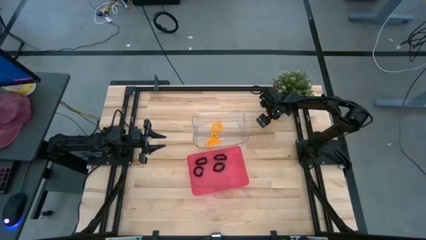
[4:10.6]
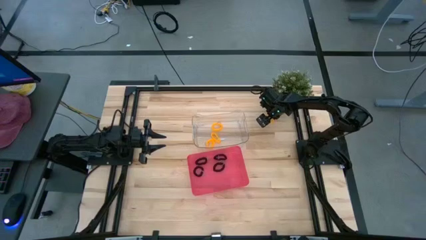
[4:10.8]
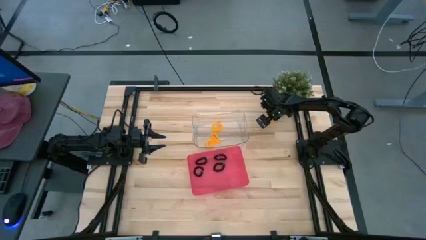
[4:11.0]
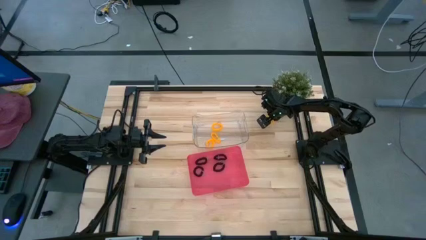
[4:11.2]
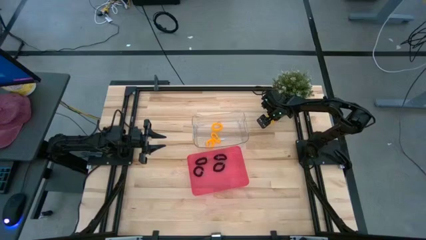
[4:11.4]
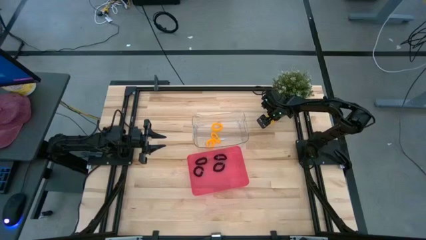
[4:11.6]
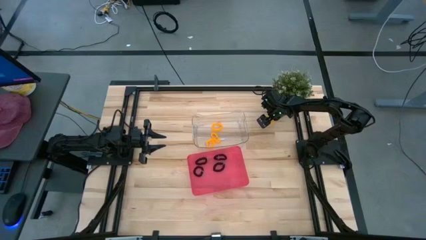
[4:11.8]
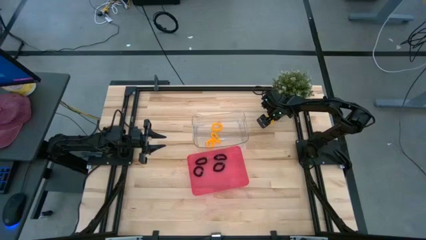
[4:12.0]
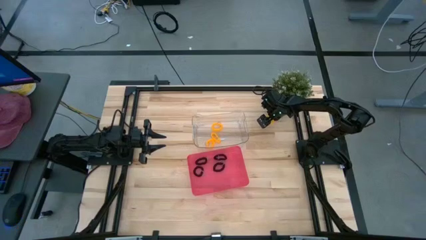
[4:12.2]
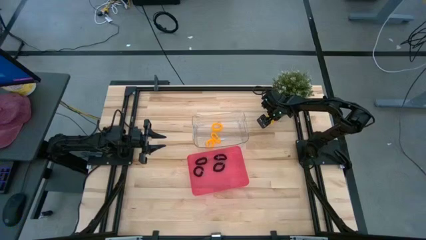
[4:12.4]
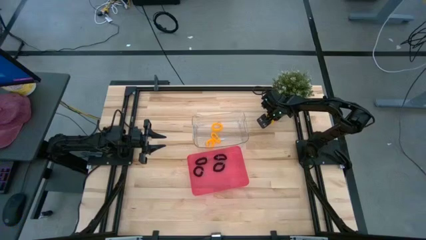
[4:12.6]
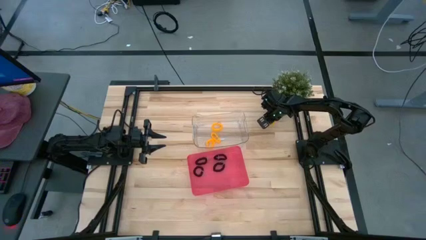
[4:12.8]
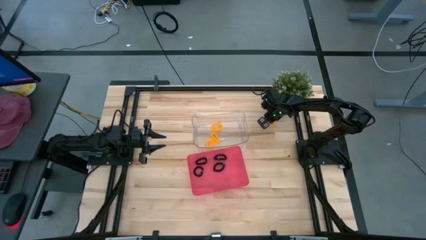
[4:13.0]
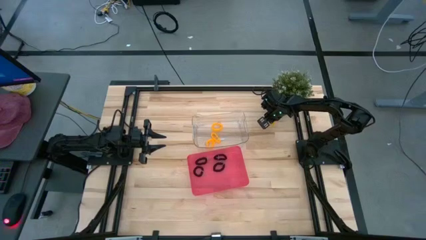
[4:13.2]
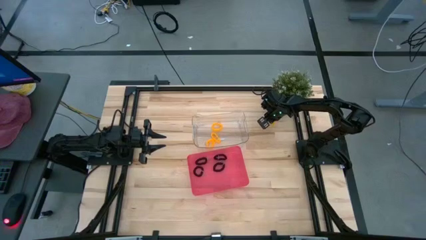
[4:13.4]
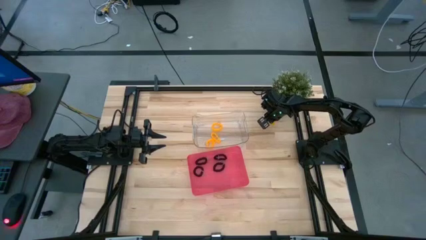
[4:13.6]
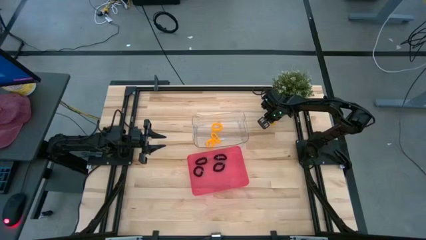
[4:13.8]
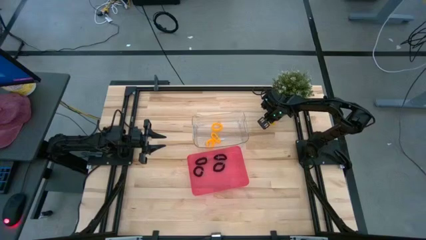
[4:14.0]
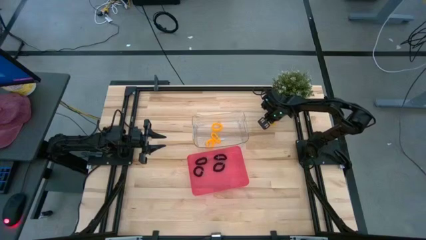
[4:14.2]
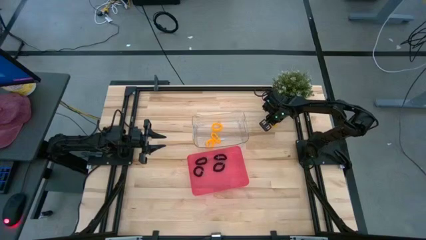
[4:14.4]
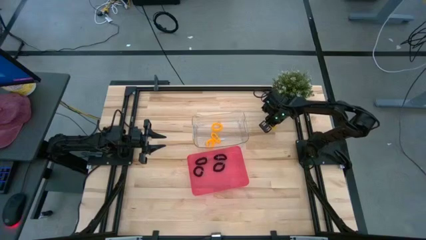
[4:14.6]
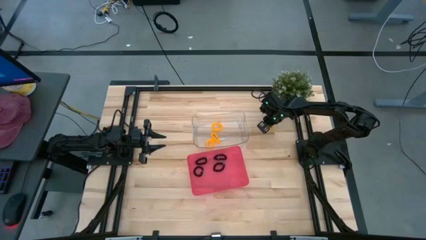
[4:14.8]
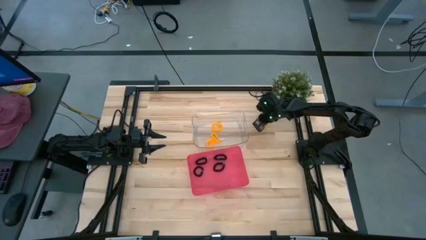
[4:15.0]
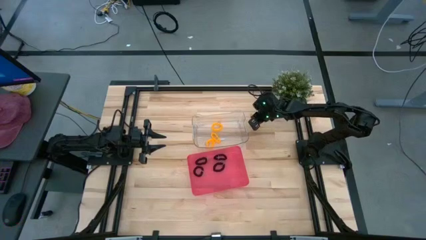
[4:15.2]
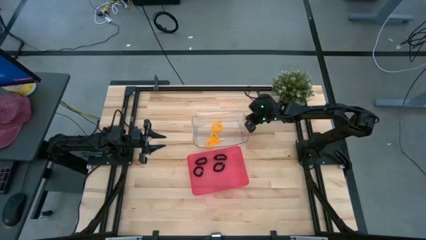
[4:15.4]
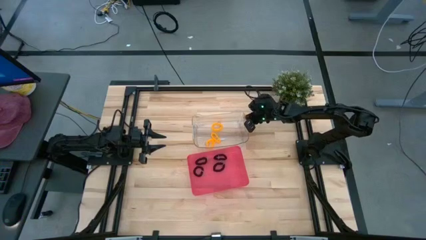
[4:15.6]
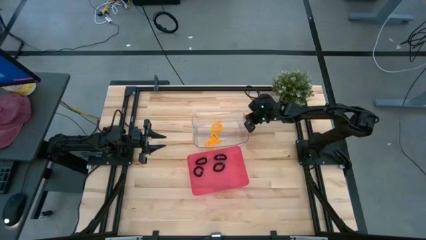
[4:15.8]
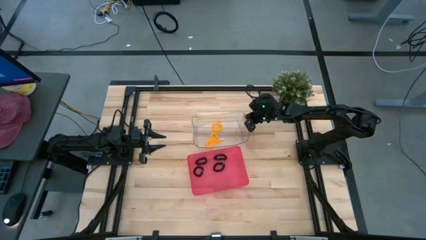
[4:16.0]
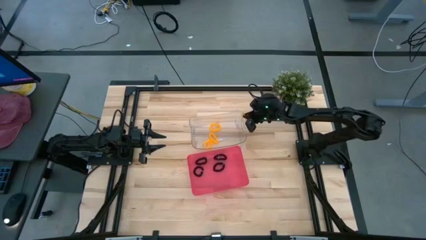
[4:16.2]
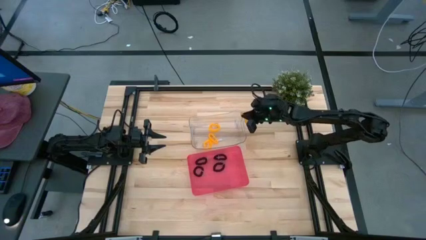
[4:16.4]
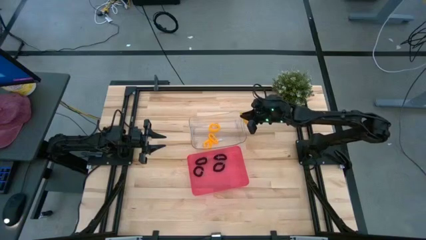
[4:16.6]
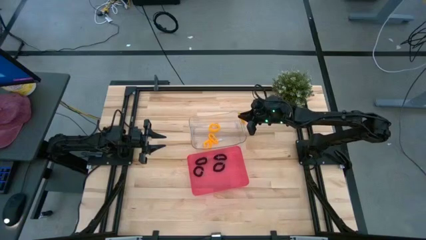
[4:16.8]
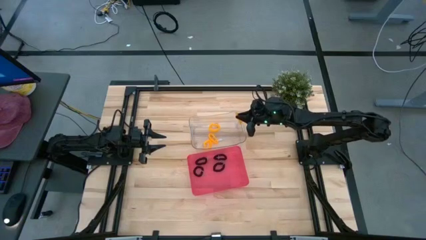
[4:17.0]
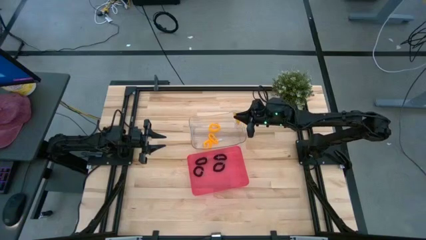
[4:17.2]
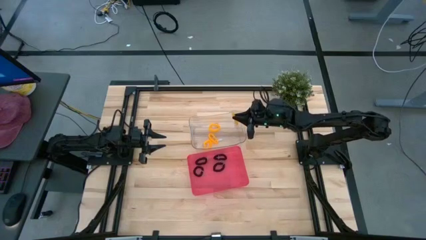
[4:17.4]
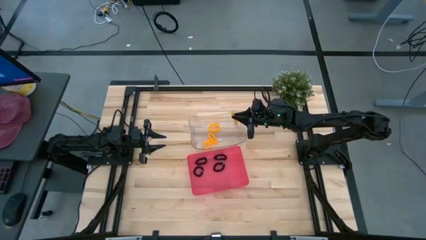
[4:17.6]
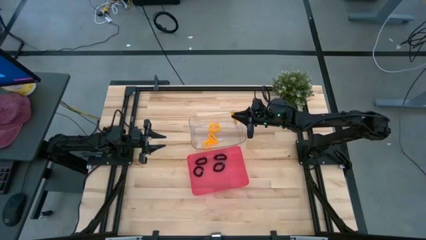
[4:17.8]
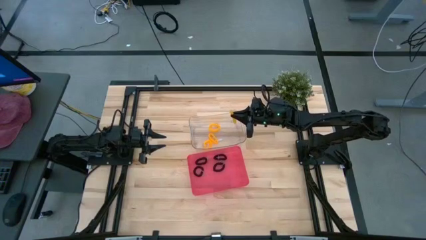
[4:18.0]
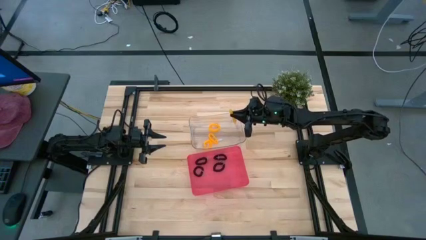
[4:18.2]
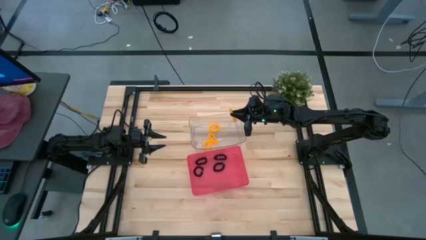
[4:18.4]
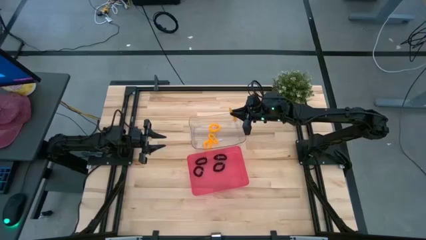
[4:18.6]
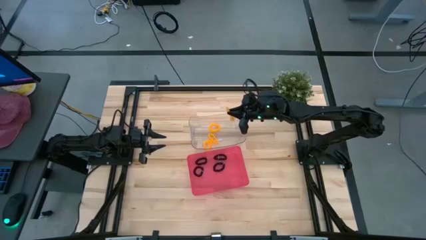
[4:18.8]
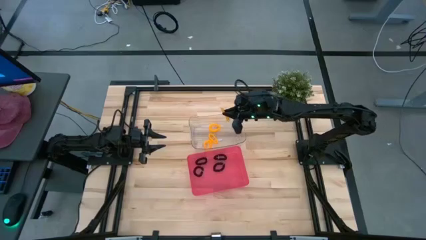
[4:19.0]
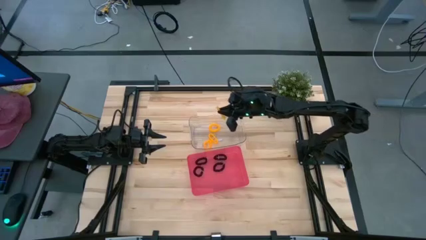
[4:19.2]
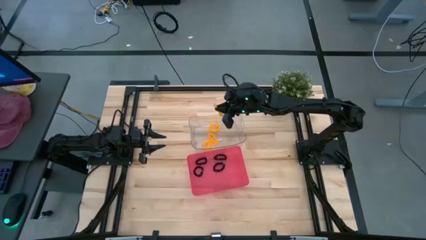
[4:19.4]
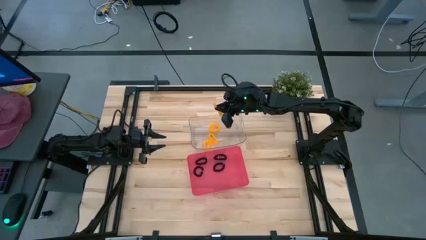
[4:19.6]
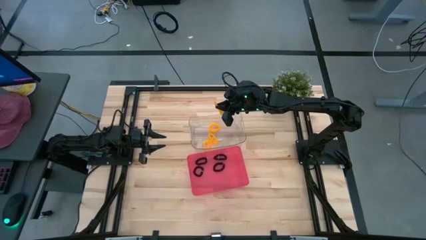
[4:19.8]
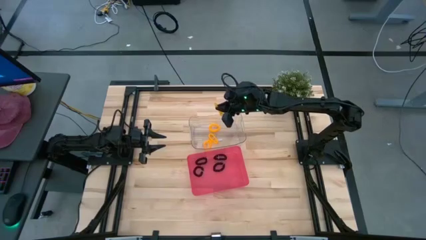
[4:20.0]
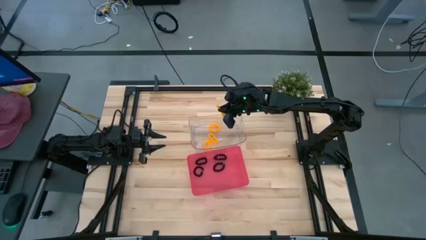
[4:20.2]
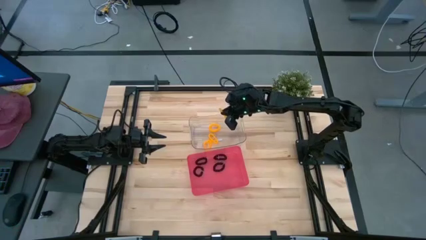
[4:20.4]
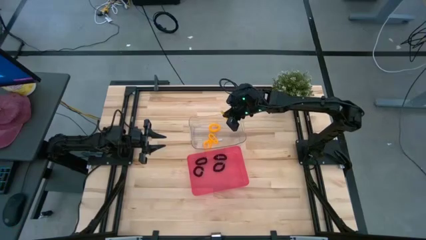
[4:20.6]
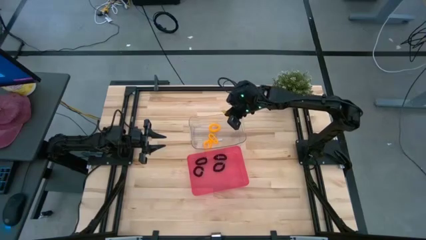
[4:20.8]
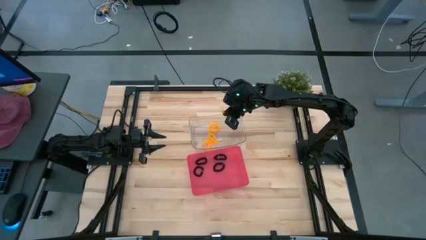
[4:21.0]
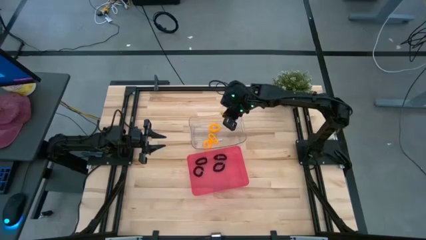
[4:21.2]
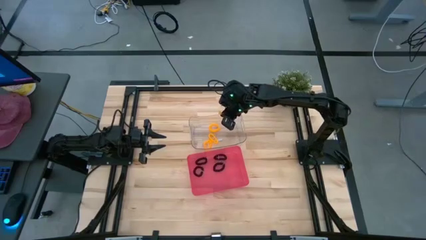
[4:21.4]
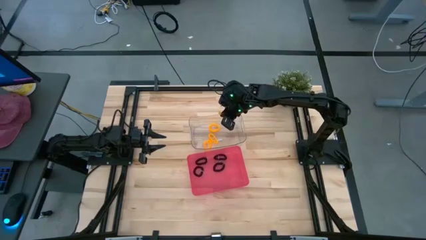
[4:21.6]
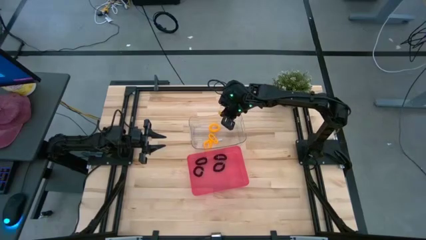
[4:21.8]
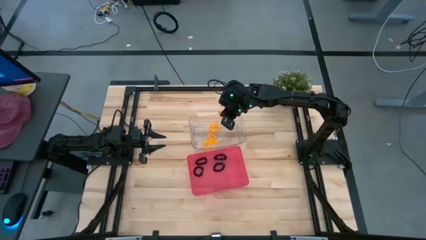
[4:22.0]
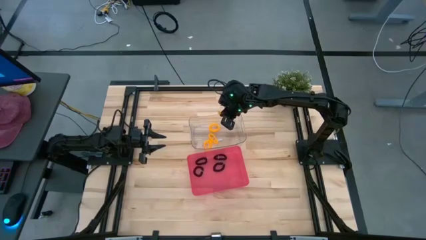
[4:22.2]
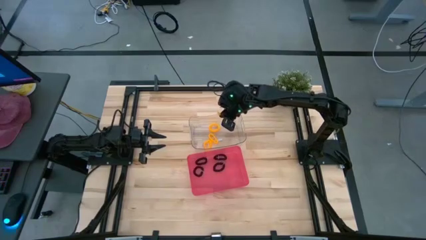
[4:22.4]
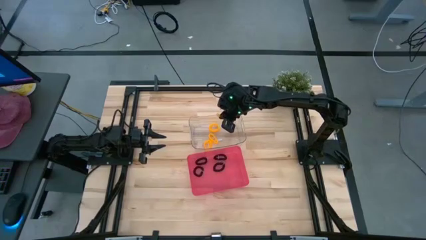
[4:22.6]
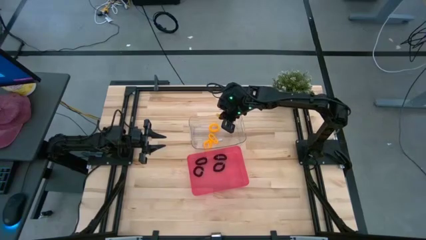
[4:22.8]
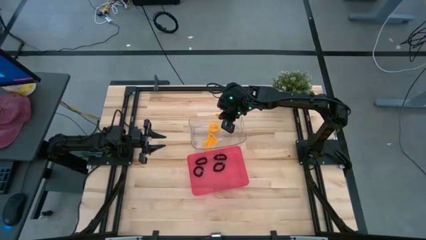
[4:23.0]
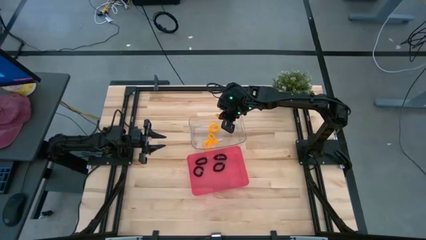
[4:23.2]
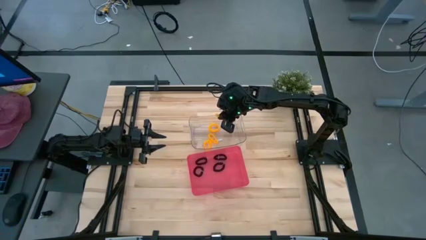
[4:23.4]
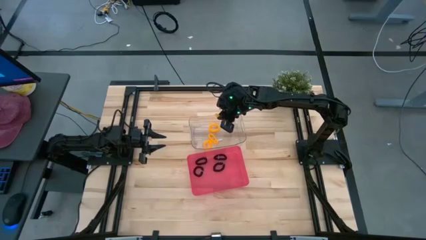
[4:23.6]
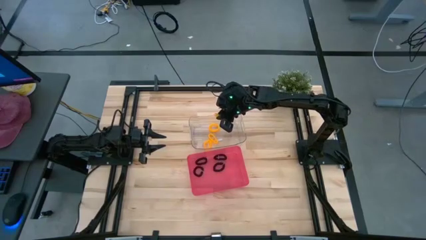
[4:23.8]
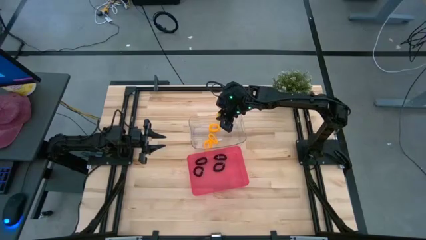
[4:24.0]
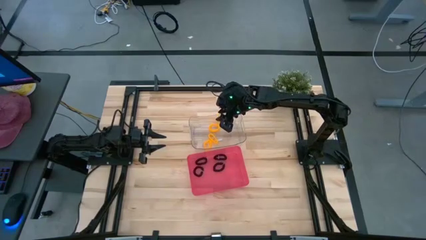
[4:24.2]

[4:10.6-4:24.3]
Task: Sort spring keychains
Put the yellow spring keychain into the transparent bin
